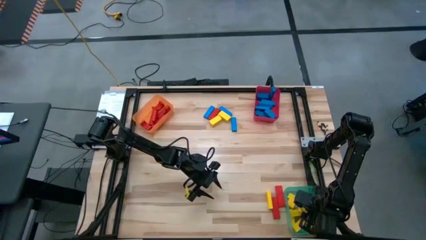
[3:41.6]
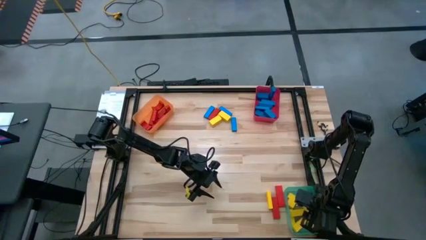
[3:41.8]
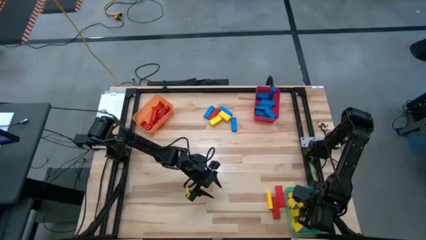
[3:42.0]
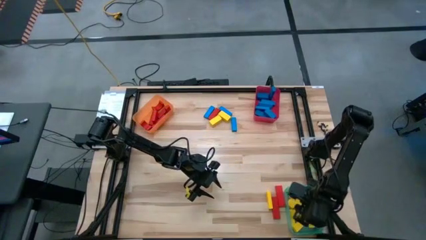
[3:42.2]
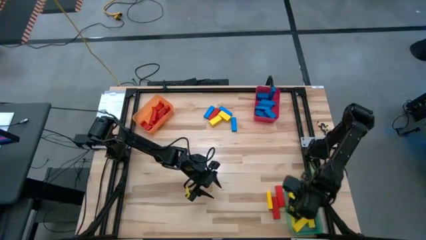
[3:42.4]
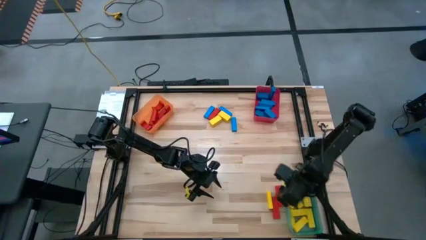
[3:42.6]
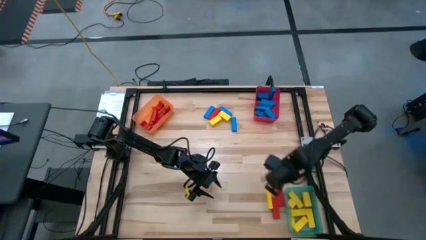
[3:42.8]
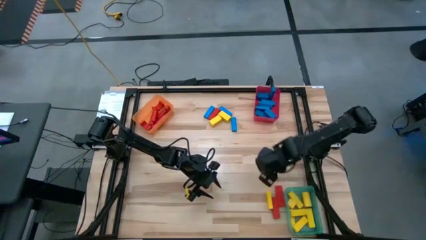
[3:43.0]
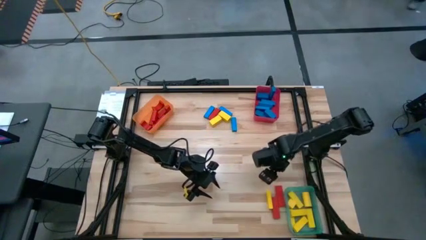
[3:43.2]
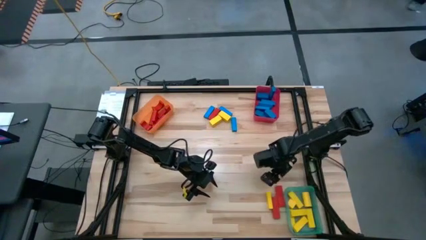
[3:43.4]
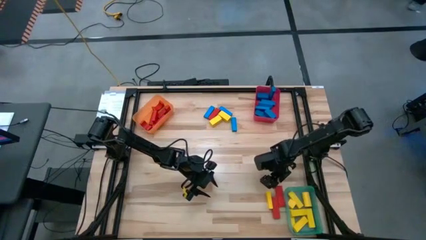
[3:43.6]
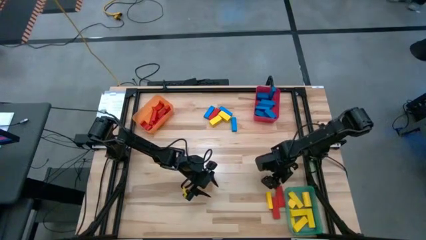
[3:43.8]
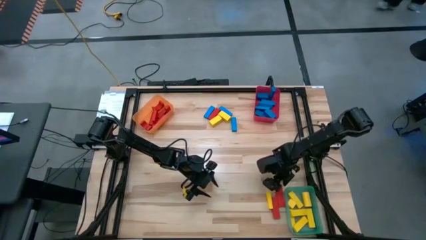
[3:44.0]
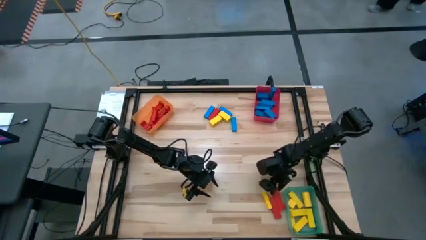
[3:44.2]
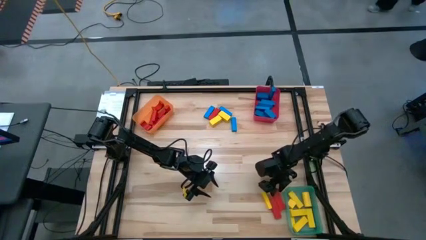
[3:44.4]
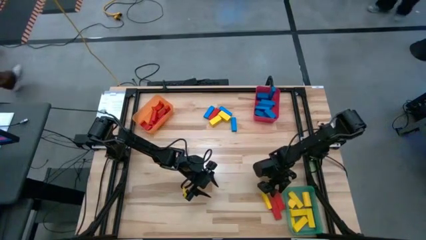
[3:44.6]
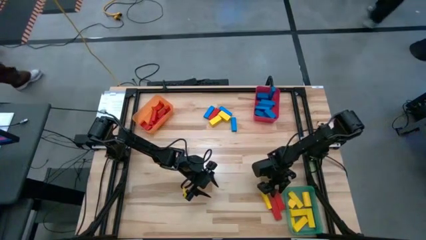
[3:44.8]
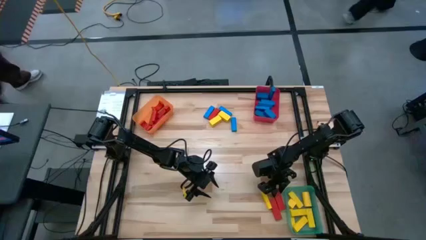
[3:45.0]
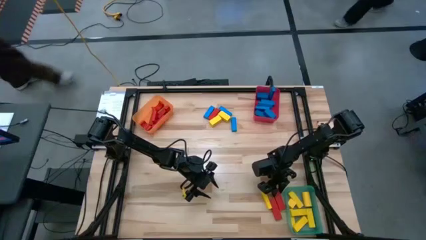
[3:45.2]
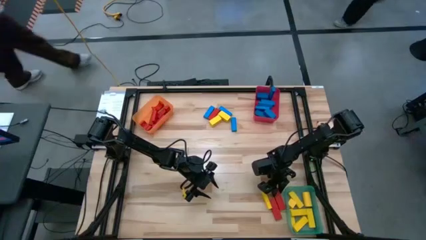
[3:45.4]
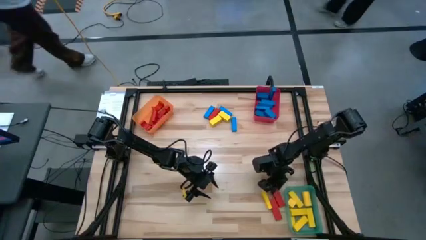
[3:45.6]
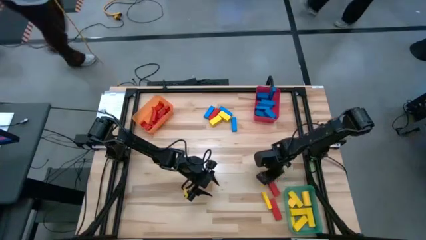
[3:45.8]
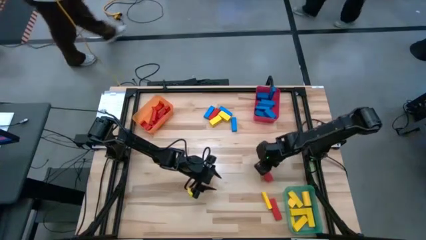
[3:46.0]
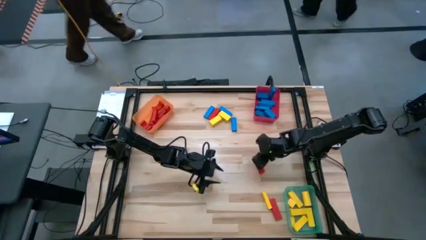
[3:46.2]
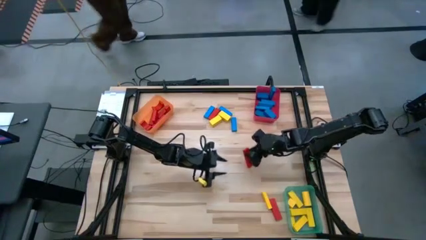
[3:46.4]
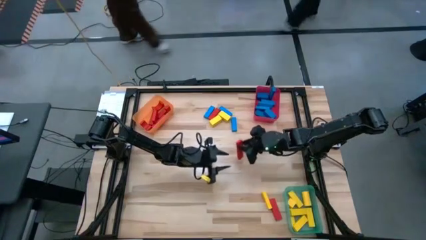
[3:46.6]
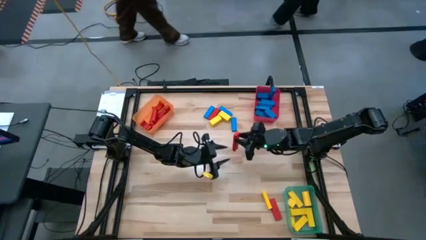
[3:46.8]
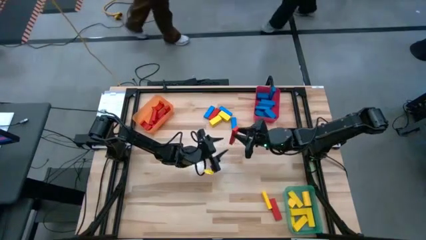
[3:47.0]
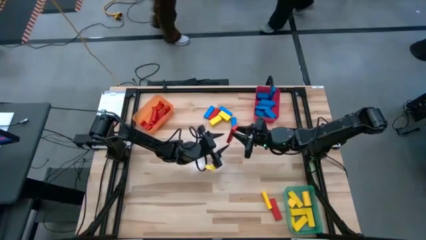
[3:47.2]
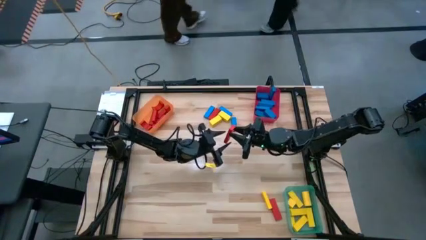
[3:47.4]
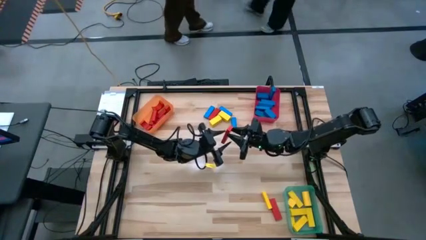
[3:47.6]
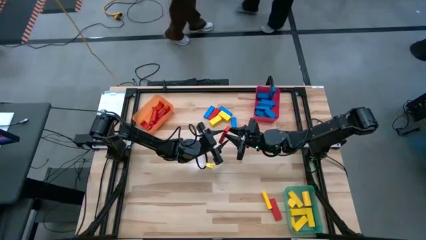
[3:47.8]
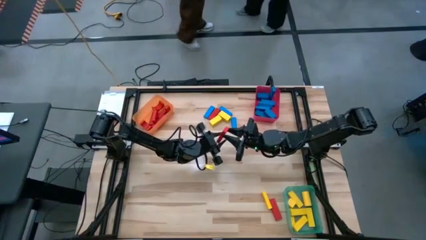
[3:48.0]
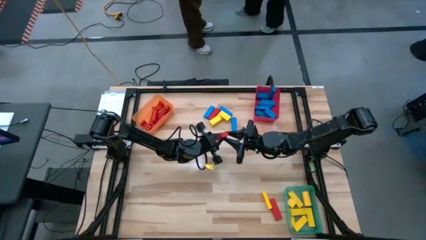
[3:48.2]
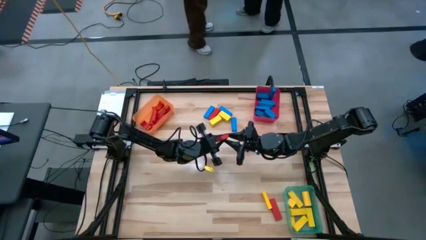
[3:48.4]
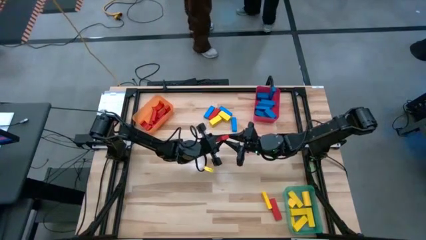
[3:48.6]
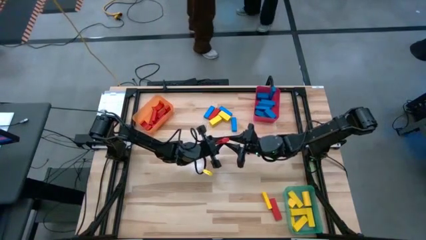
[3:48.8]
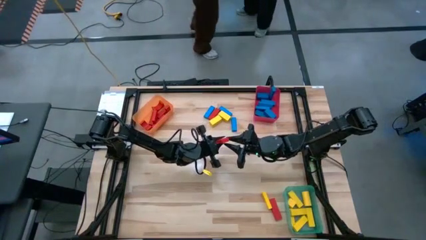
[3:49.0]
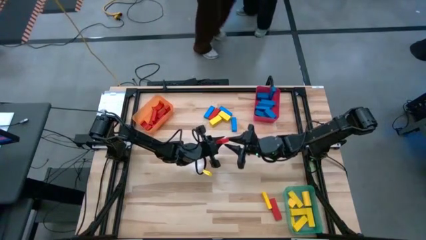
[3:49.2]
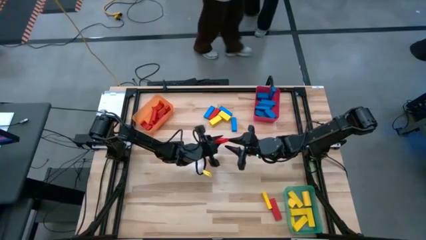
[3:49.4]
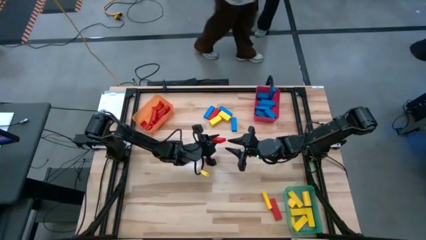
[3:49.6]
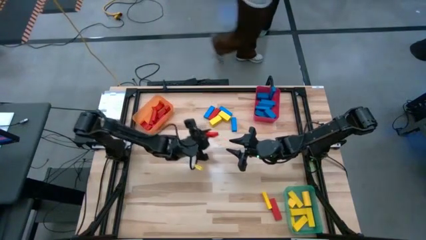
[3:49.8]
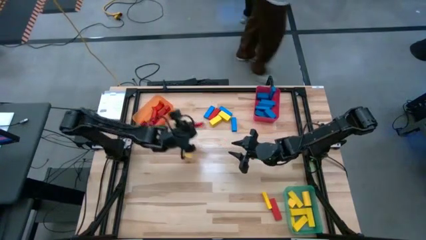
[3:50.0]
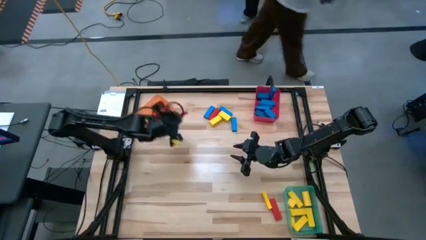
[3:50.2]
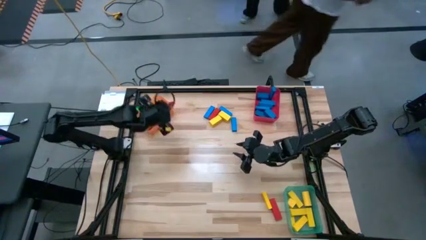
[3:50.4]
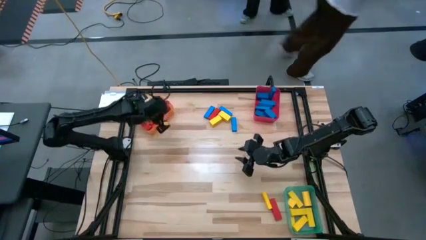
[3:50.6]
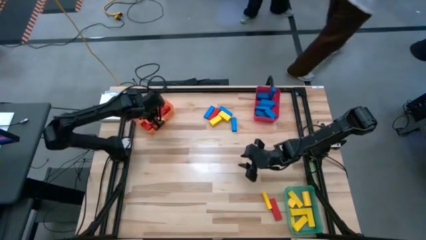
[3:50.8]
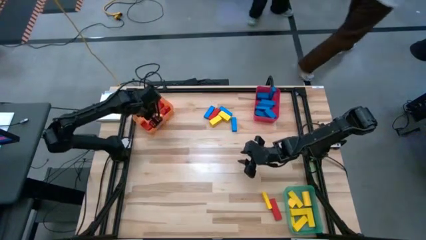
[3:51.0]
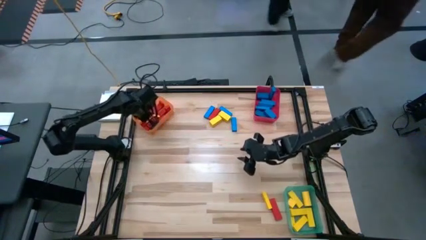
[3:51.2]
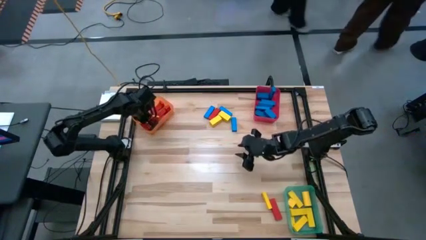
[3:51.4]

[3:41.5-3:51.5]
Task: Sort blocks
Put the red block into the orange bin

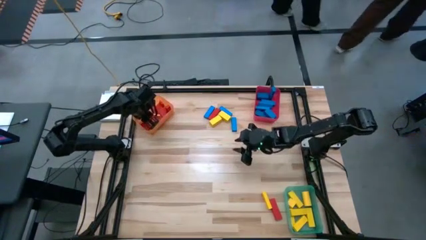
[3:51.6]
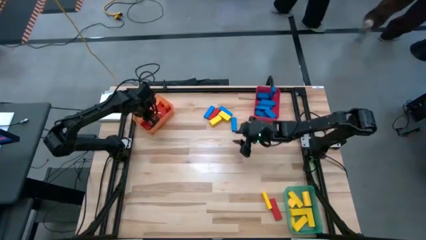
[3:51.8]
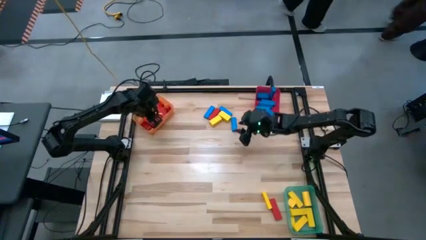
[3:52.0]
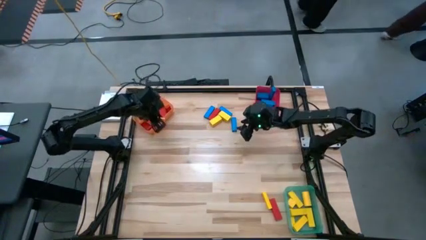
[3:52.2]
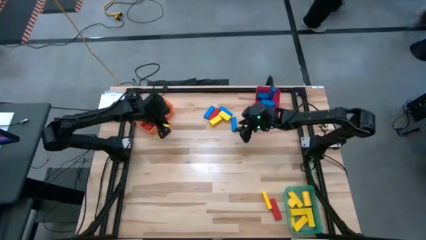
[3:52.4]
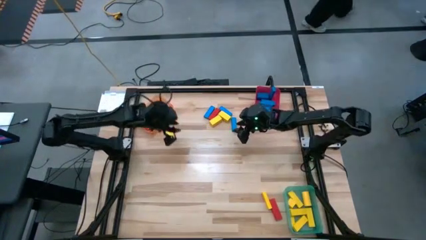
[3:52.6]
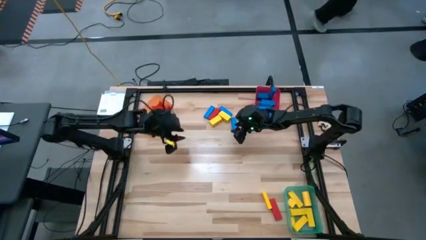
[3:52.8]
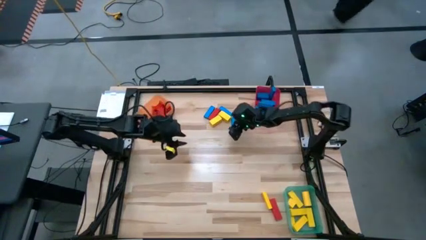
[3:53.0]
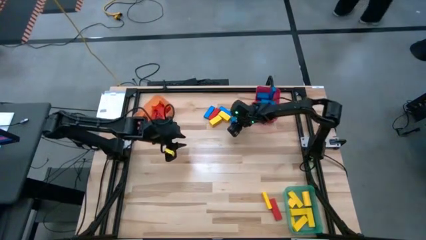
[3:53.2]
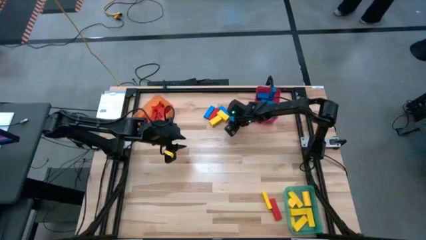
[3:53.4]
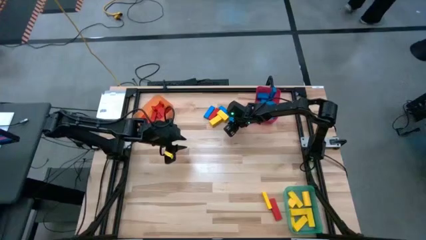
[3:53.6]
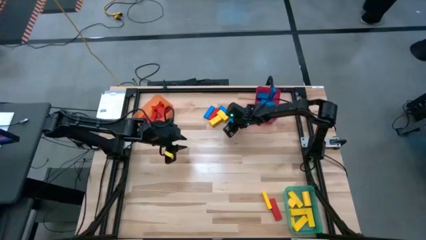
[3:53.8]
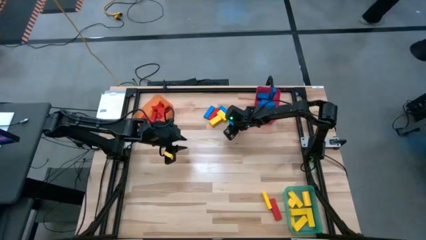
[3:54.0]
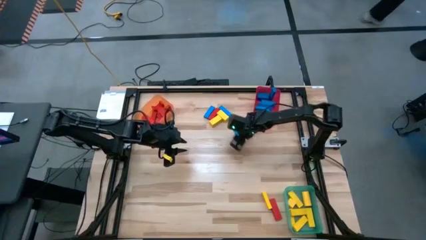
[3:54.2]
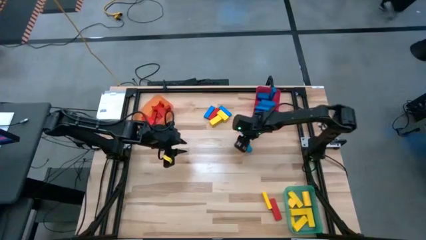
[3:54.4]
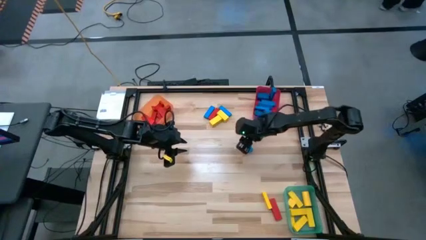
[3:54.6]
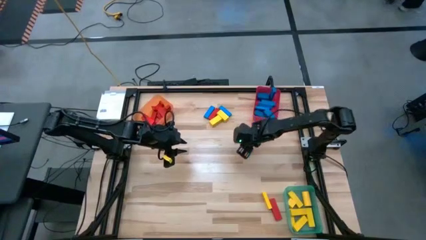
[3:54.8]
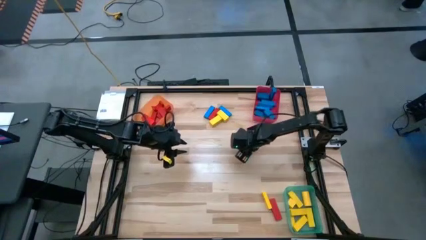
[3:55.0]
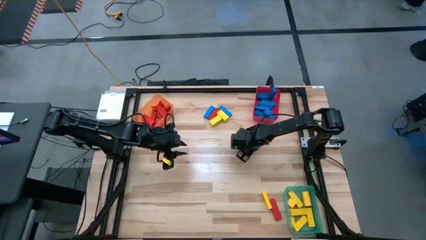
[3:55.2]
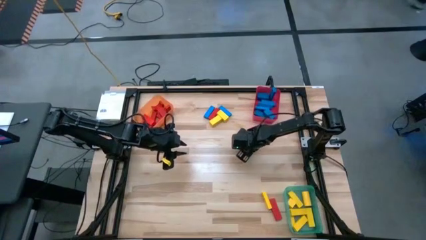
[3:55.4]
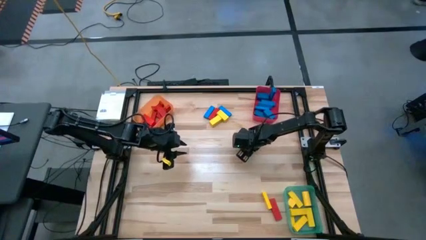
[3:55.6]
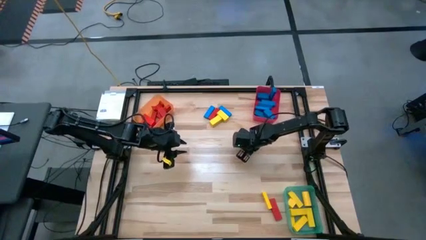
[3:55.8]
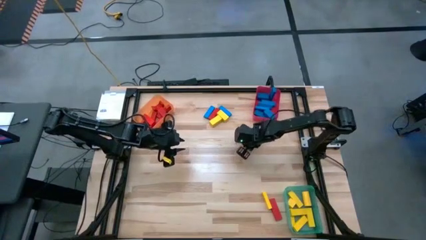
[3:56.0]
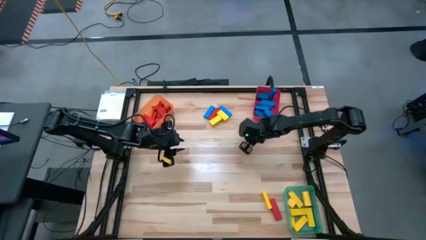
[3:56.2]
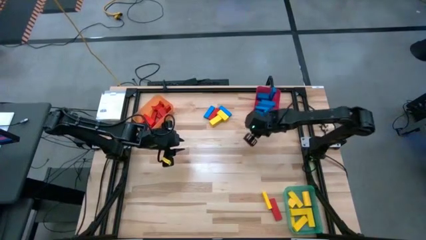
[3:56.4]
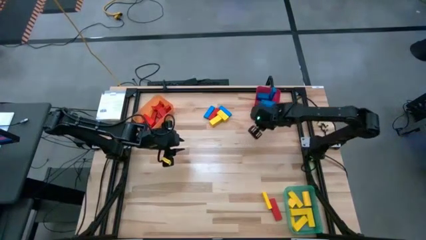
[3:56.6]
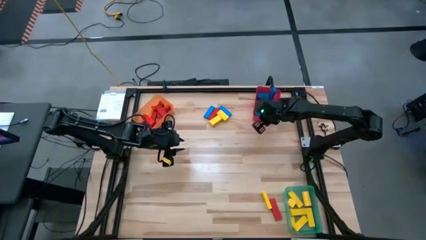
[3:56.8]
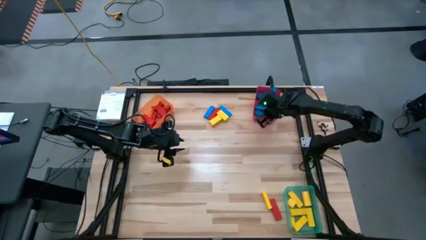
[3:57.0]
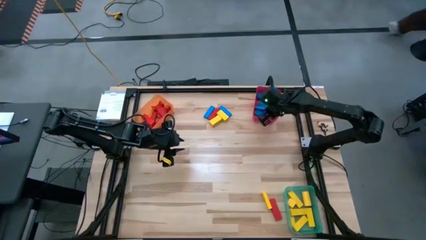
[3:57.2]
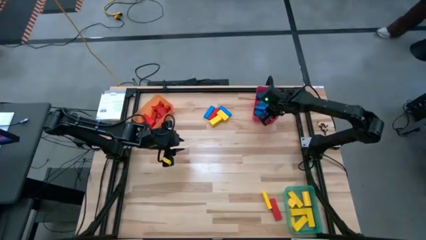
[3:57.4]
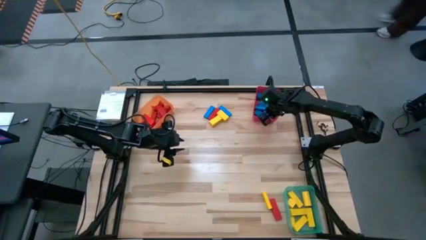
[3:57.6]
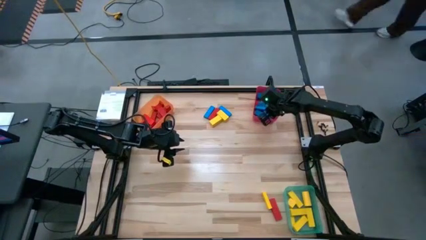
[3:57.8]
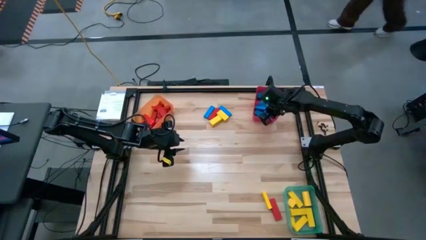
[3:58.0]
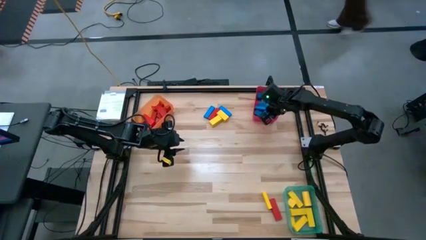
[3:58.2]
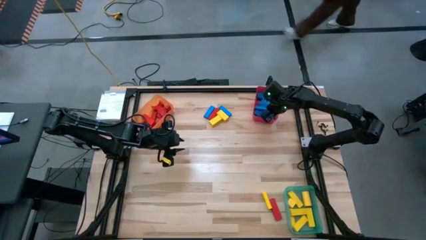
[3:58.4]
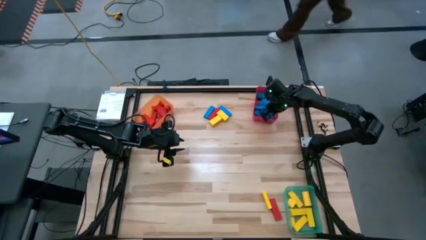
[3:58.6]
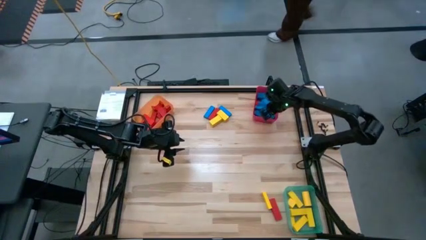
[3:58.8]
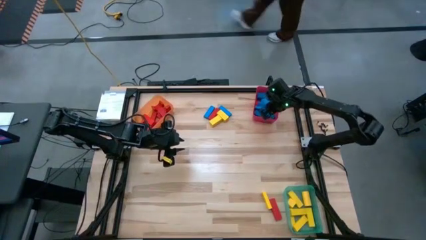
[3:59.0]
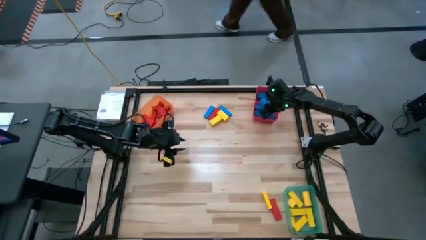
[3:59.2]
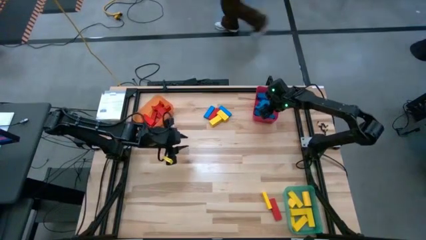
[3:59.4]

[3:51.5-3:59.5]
Put the blue block into the red bin
